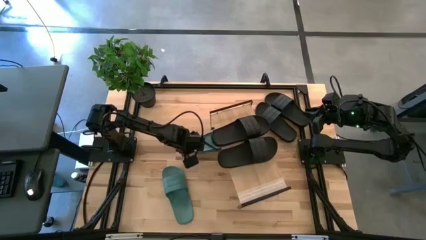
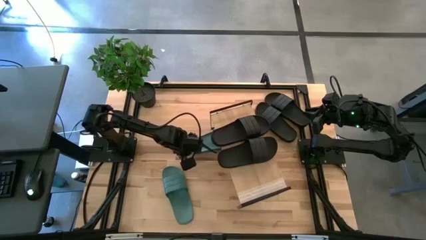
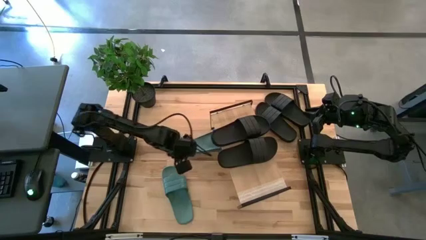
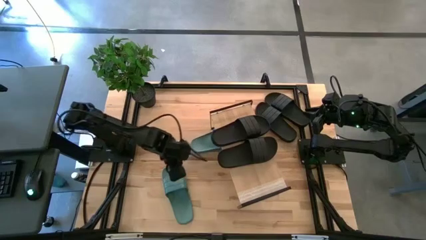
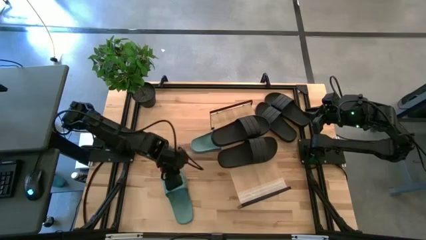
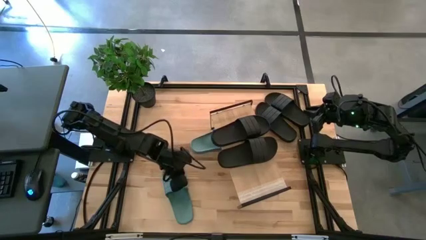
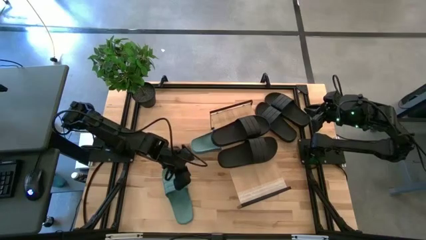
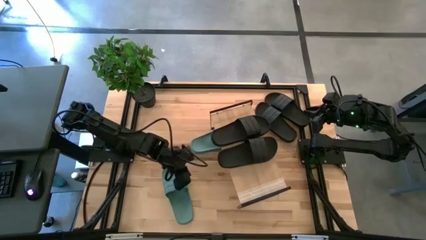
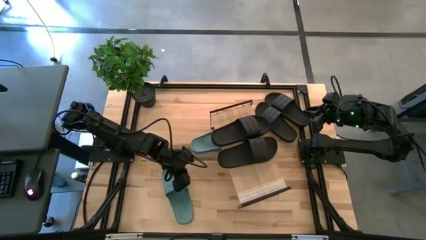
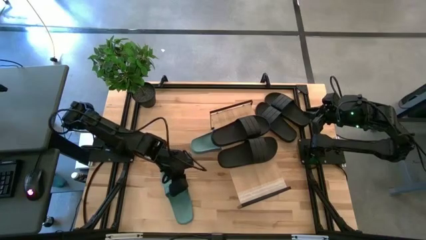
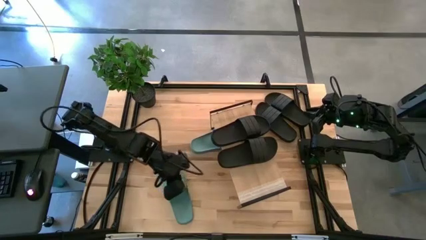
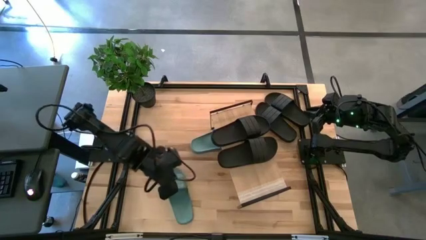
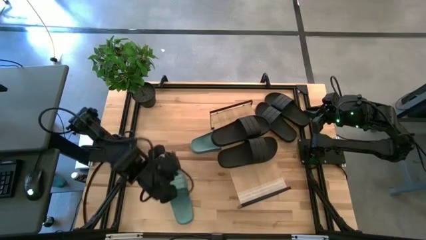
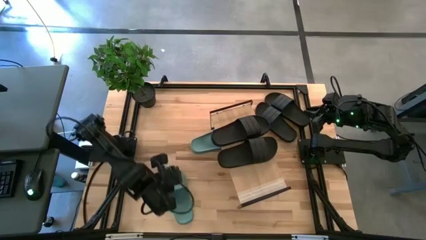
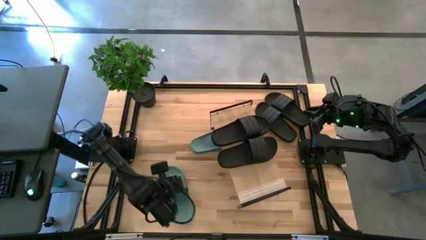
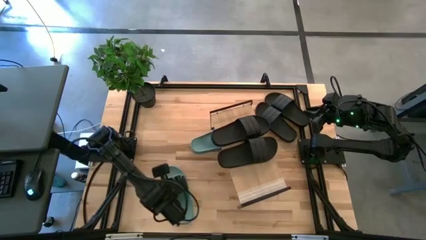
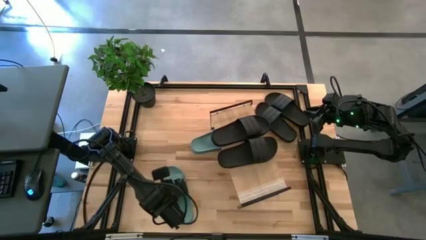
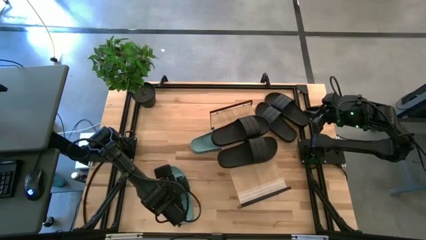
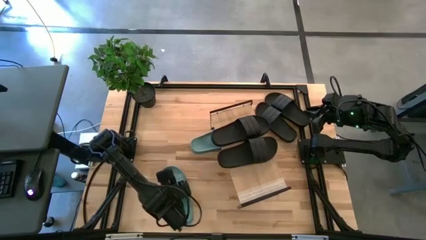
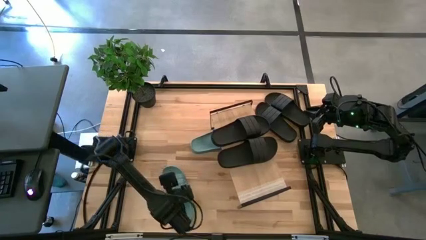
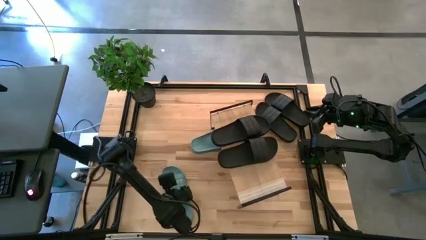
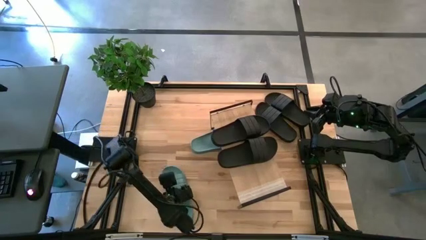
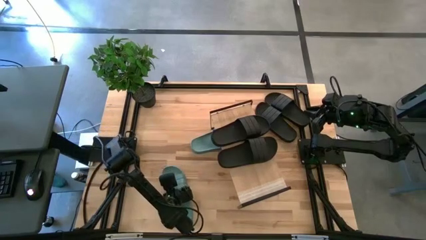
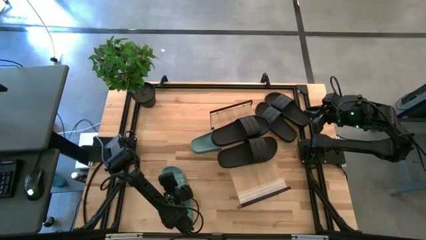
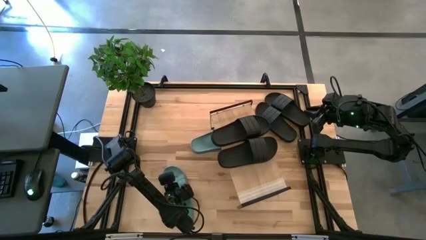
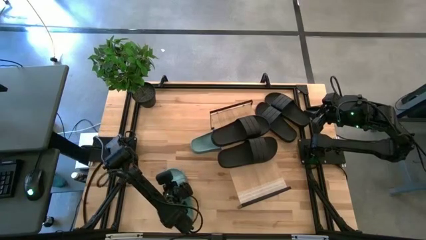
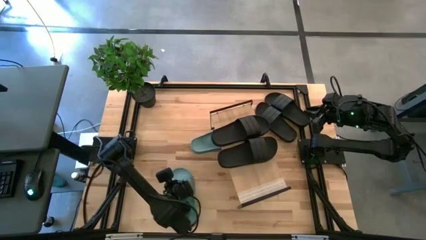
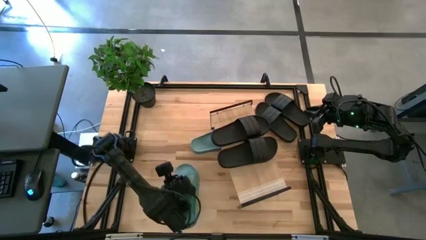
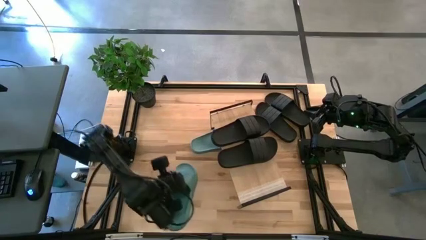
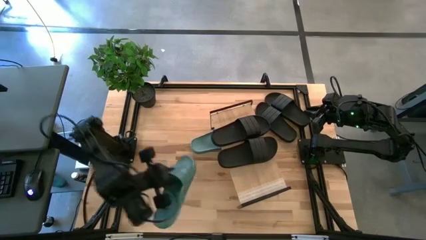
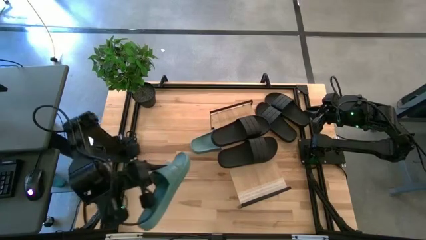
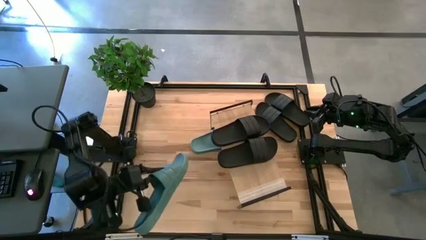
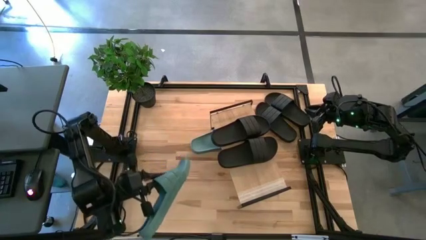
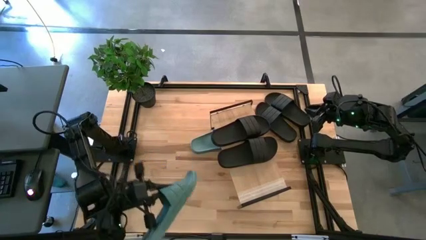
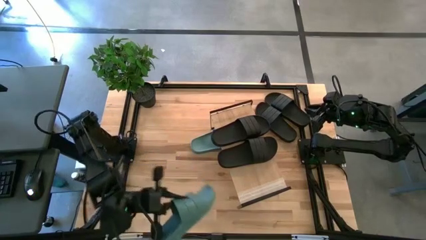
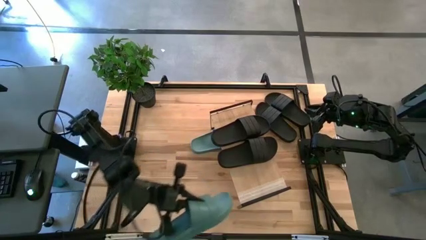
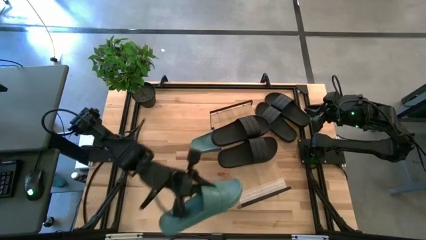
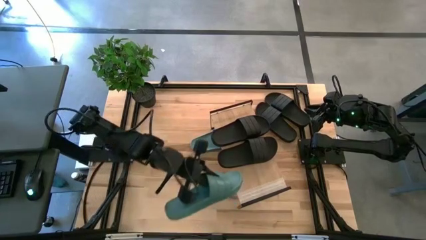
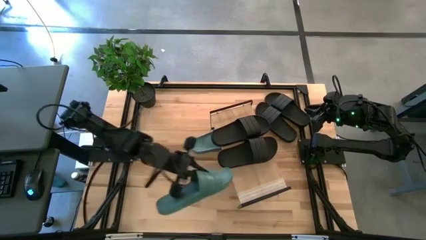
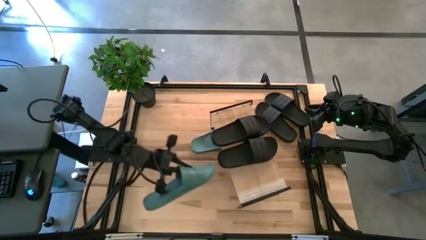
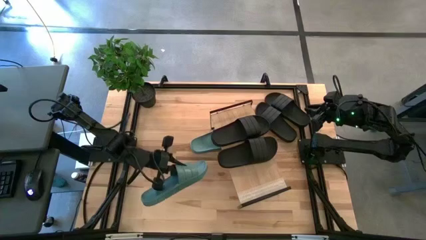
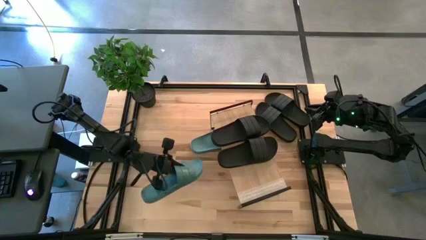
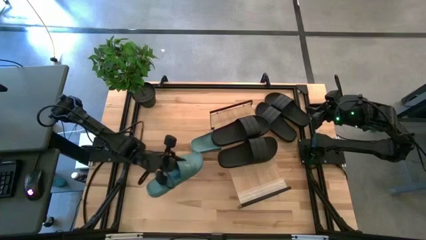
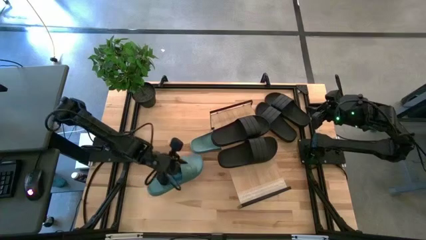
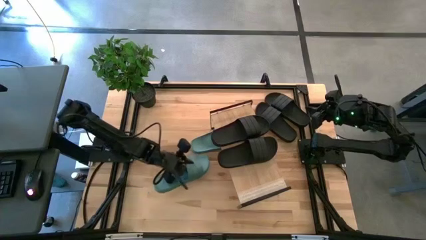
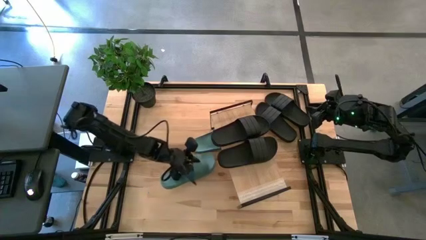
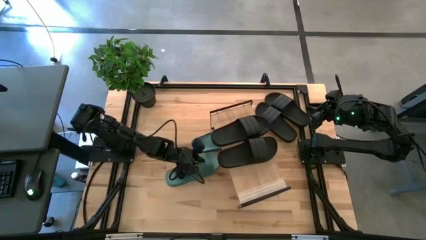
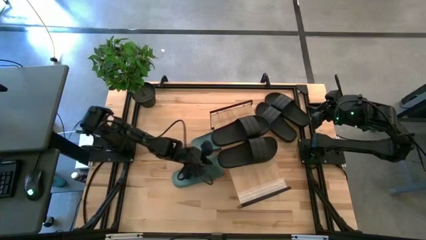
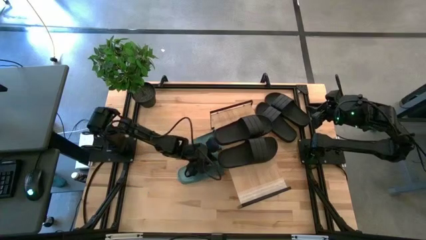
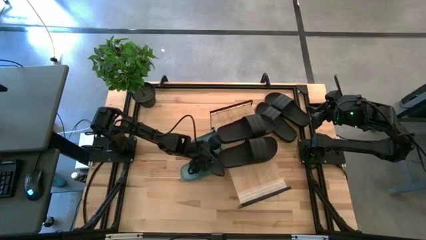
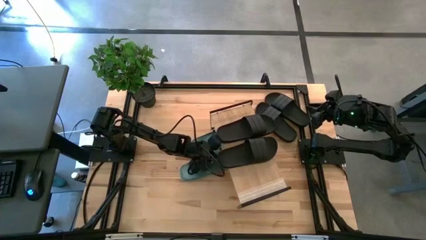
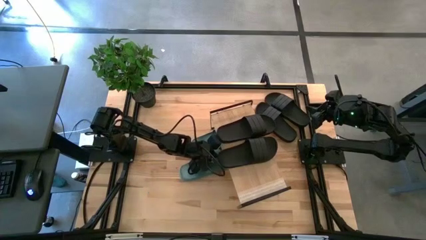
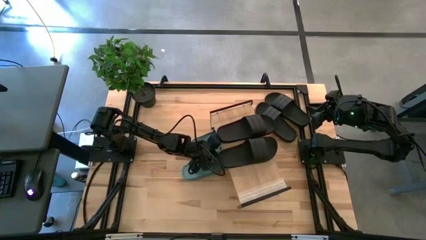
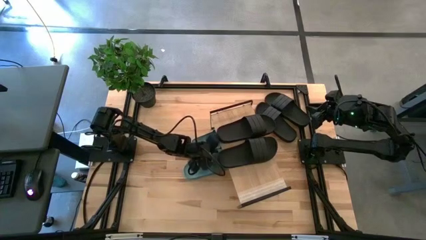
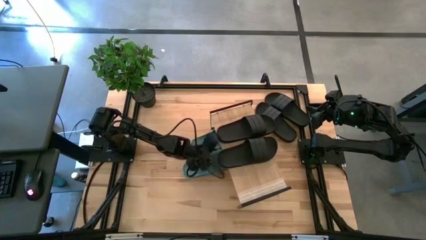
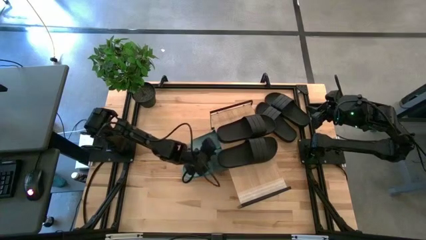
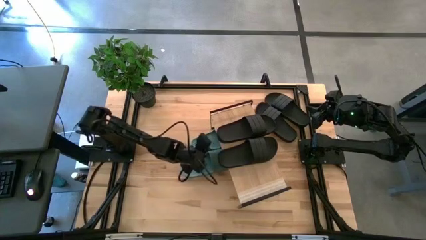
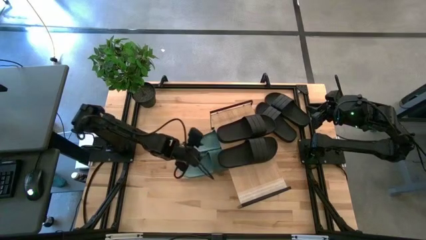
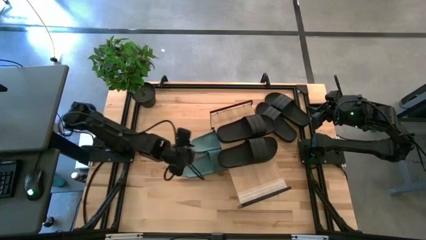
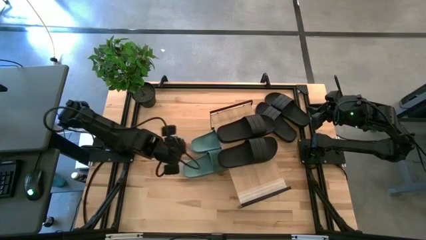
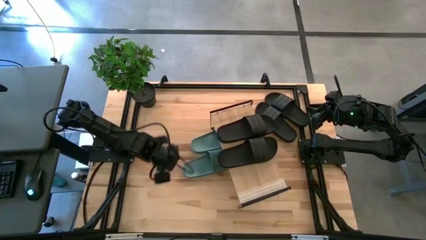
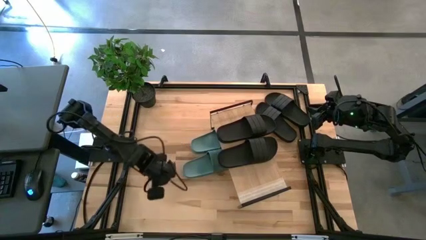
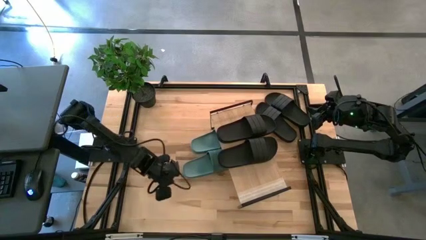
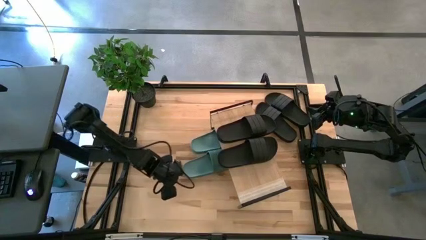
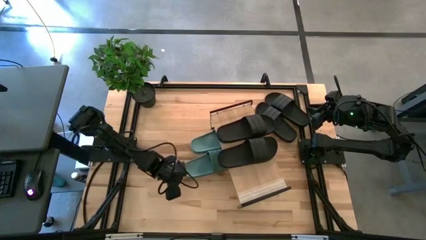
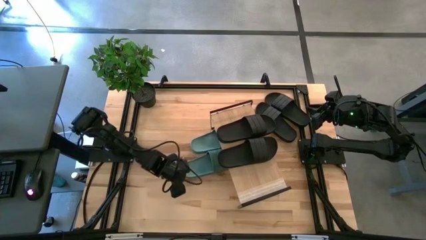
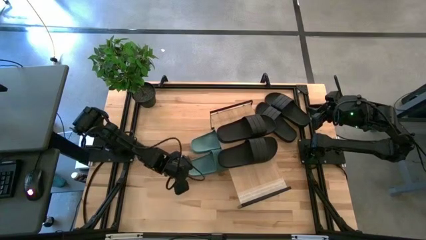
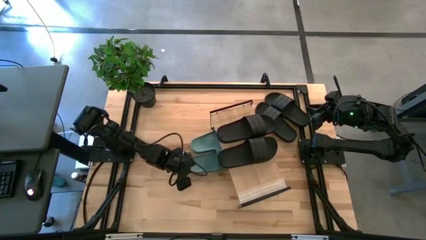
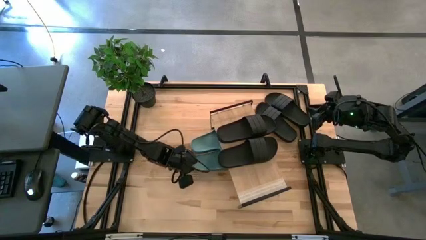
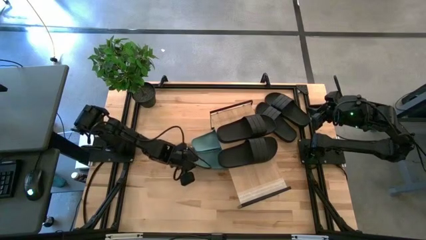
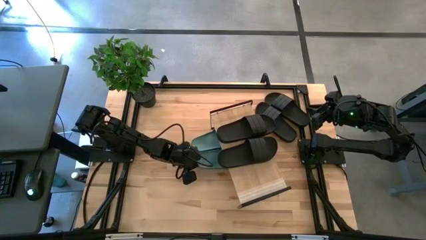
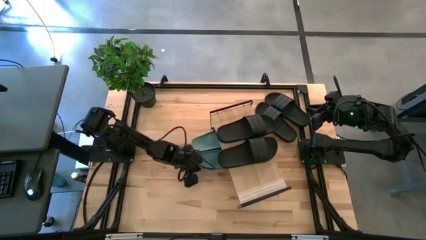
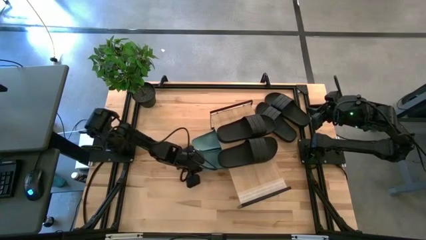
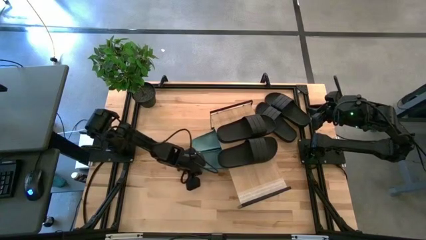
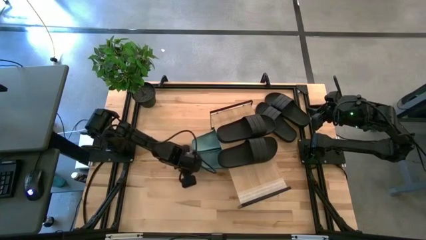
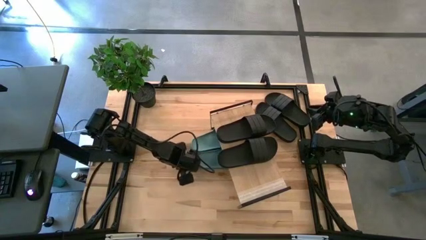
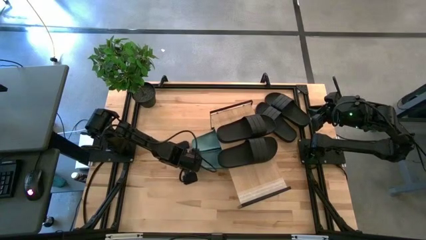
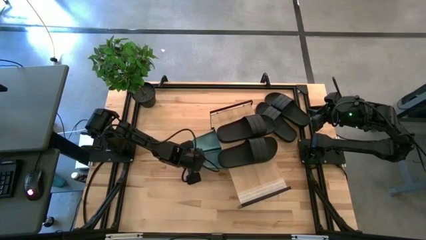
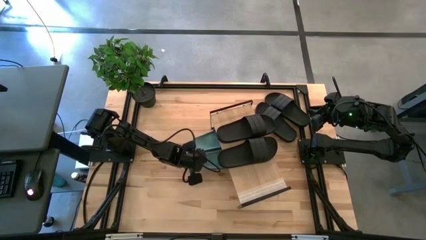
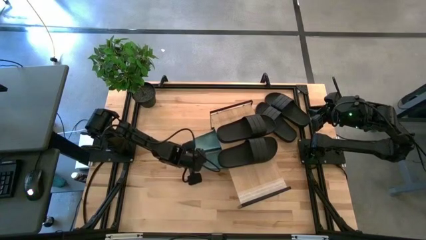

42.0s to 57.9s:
Task: Pick and place slides into the shelf
Move the green slides under the shelf
